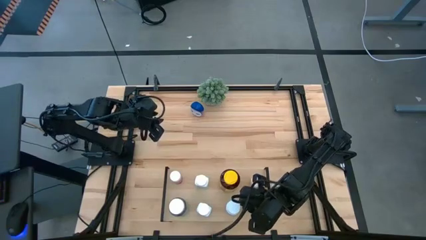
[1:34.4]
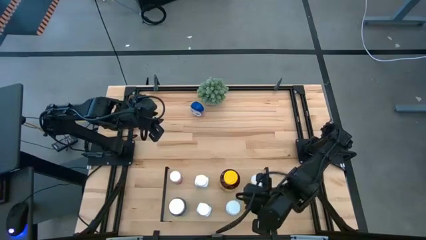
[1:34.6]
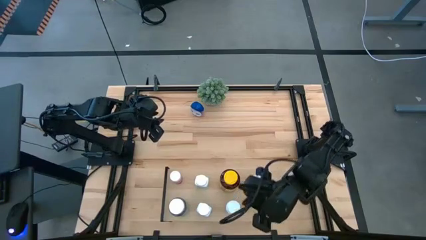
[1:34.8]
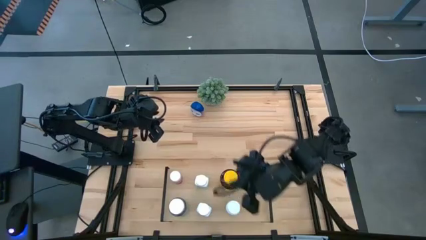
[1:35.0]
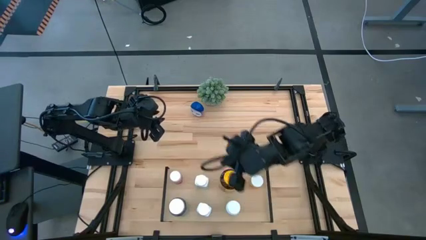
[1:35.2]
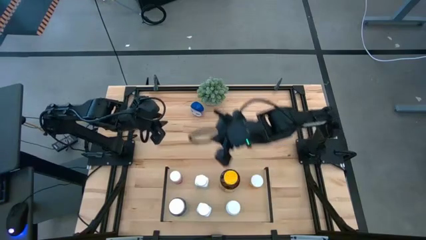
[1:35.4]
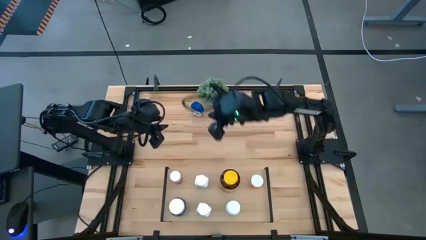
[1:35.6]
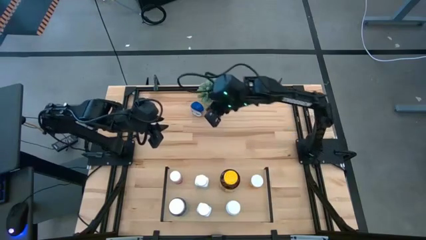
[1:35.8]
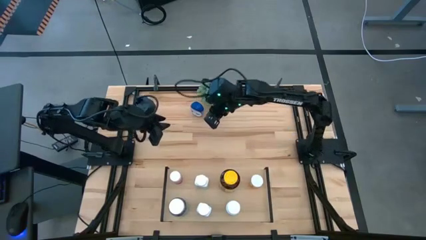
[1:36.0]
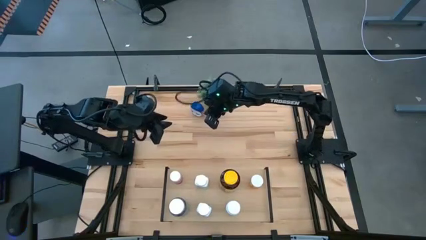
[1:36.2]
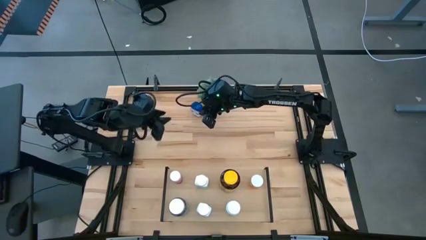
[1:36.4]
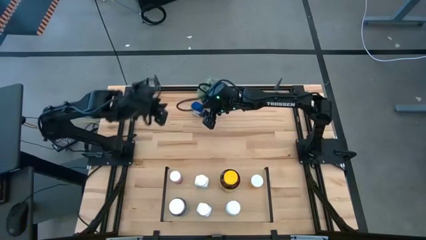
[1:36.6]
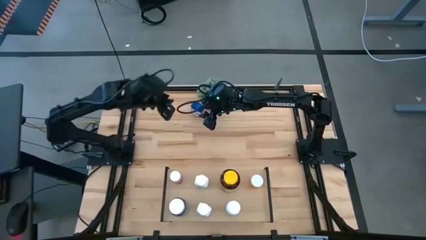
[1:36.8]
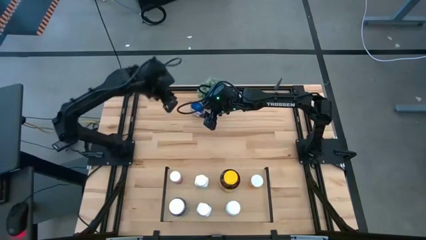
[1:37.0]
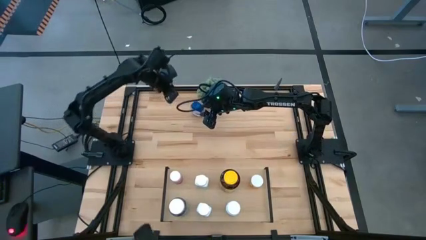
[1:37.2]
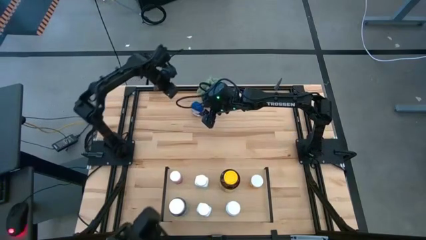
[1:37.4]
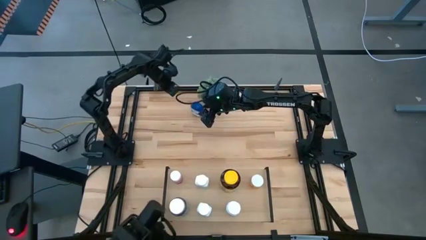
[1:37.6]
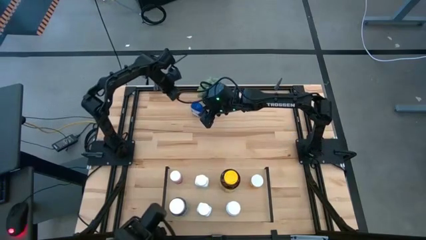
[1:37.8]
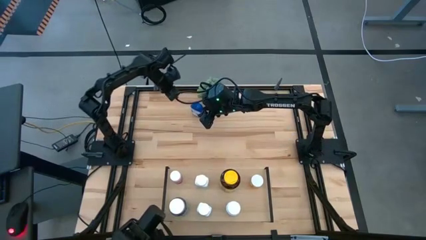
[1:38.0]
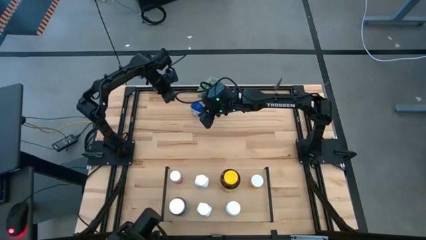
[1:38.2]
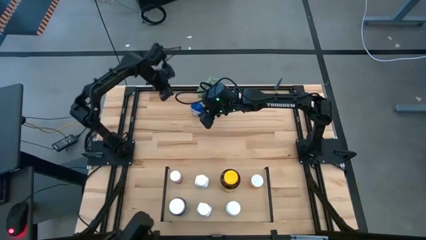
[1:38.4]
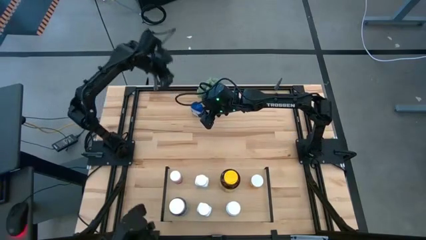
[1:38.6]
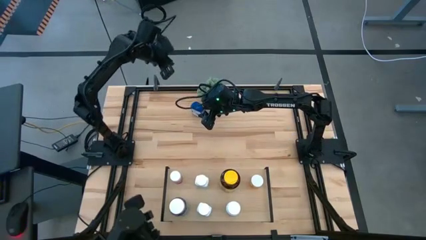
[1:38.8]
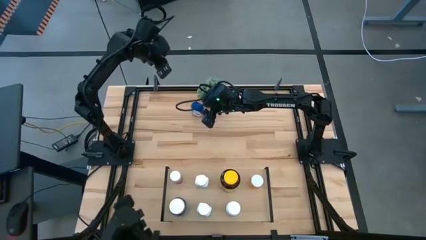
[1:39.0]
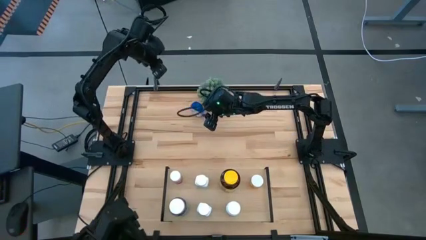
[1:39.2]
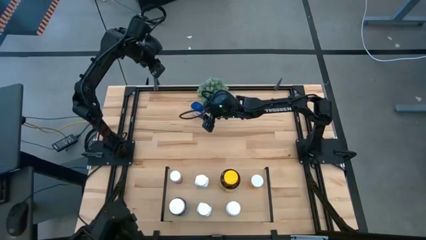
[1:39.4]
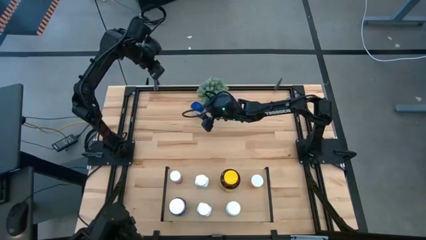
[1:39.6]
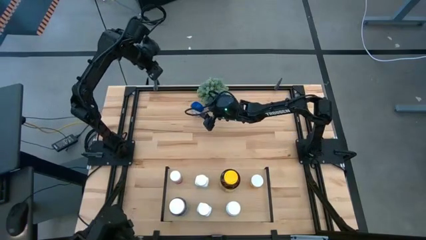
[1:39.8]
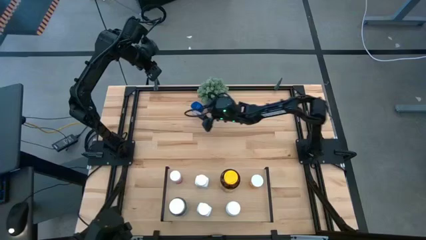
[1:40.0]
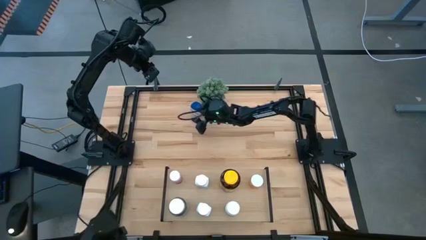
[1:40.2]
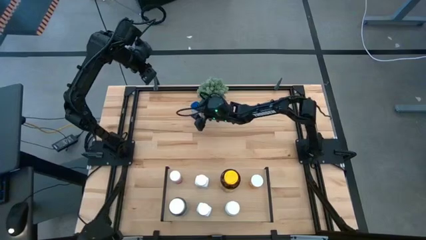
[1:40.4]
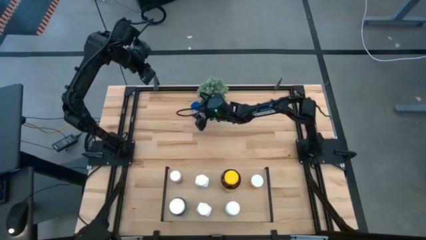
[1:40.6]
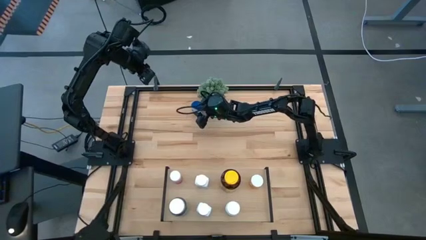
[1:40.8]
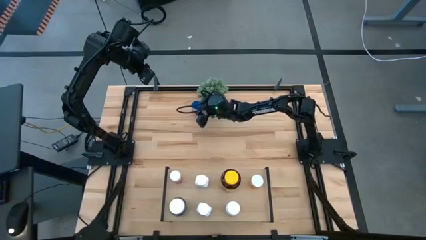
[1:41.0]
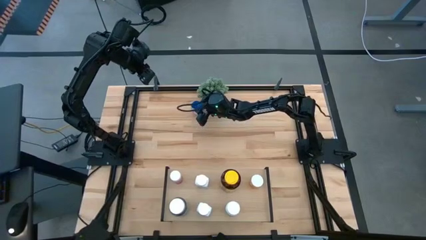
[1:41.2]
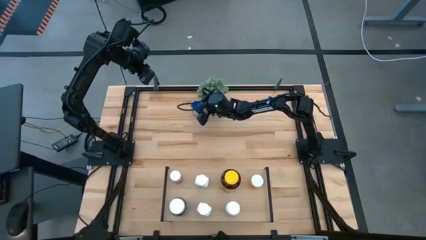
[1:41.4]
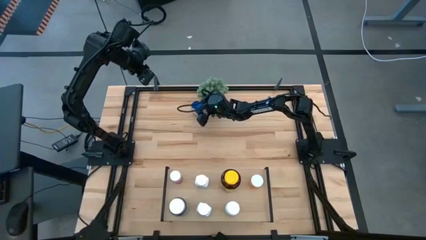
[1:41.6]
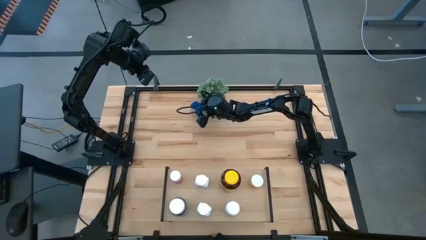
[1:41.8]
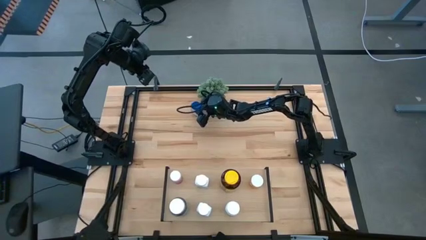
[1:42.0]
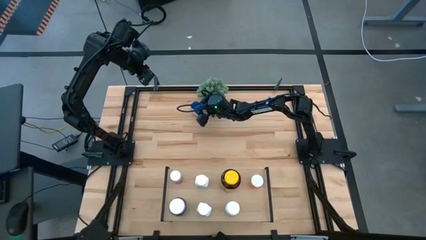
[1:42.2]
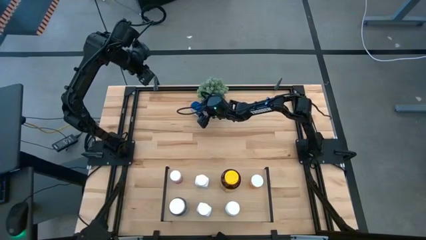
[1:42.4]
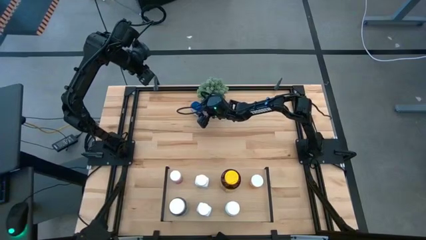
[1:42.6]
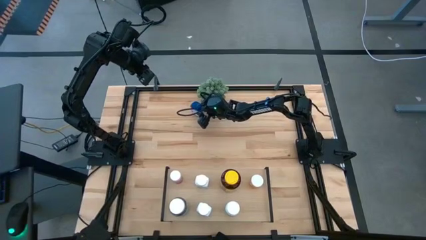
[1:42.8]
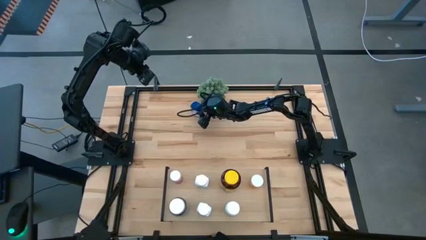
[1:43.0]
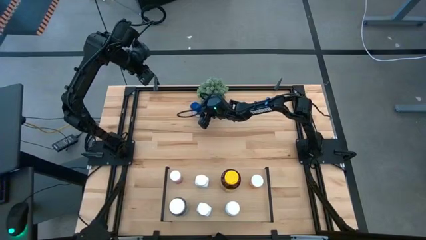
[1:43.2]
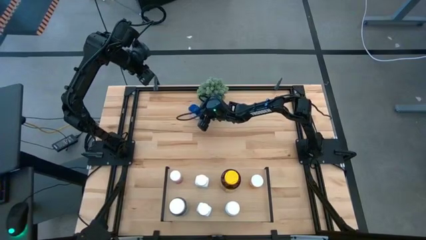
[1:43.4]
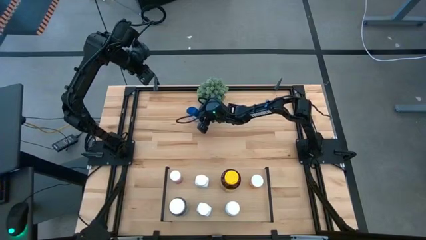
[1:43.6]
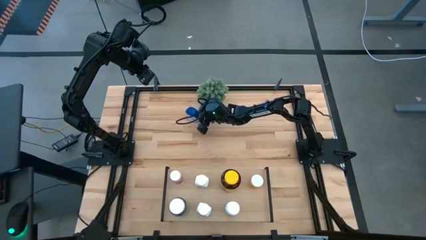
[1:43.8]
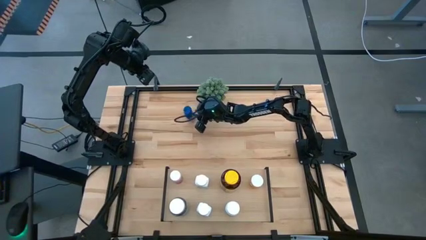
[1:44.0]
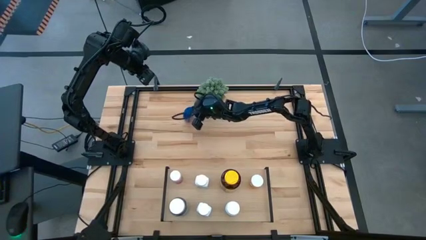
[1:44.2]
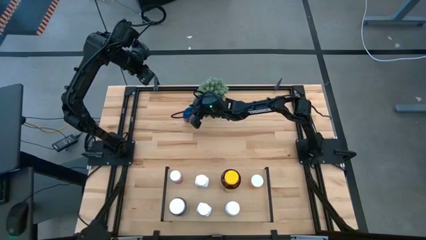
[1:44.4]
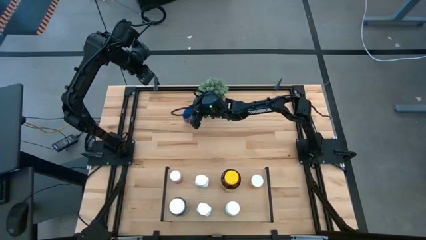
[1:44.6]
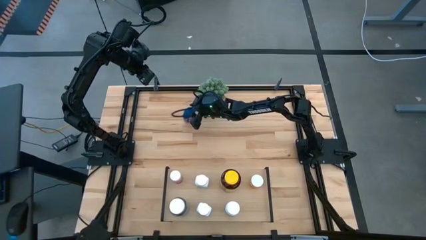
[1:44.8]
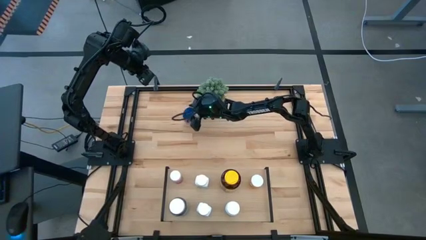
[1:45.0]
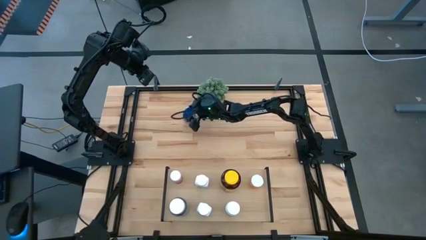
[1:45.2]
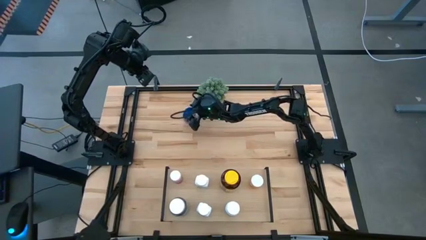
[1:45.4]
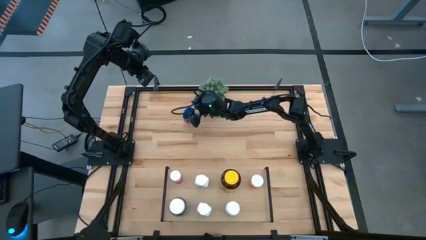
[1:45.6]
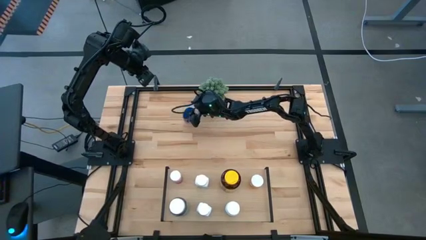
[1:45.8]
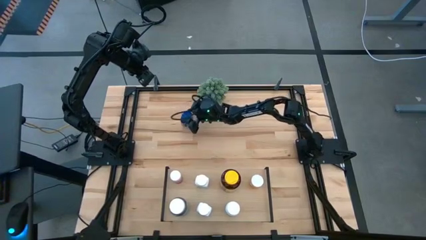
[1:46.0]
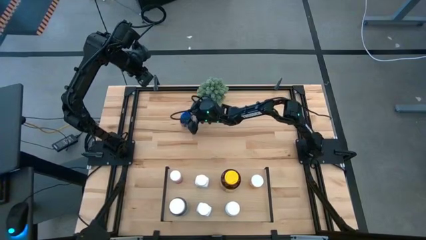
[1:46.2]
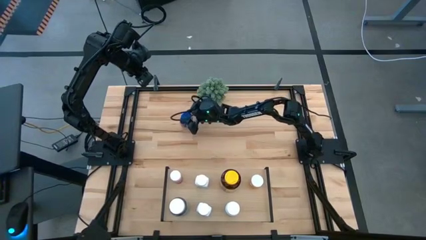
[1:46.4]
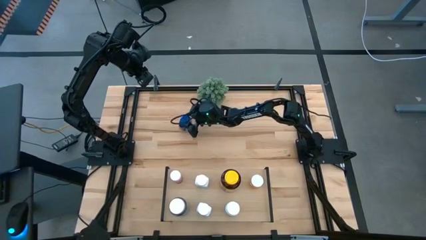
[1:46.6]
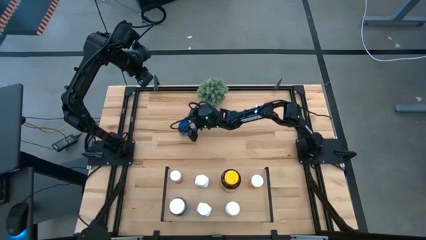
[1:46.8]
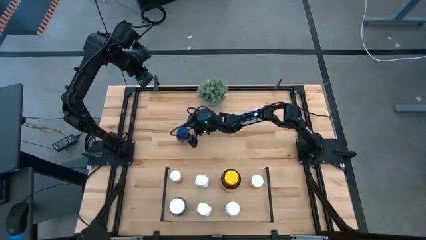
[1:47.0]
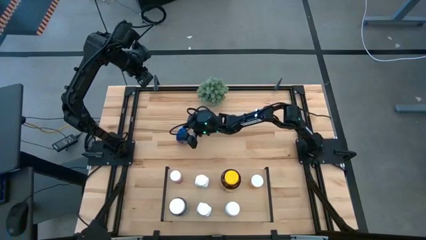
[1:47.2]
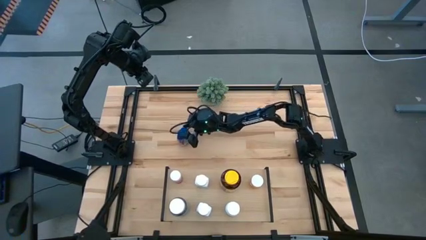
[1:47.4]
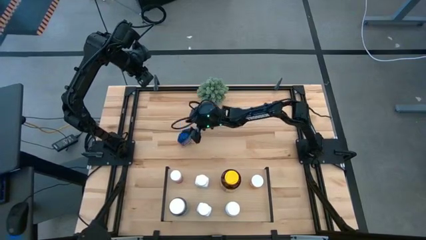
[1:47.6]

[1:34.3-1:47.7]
Task: Pick and place medicine bottles onto shelf by color
Put the blue pill bottle on the shelf
